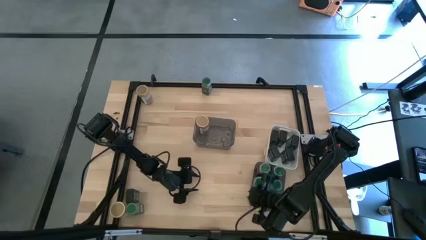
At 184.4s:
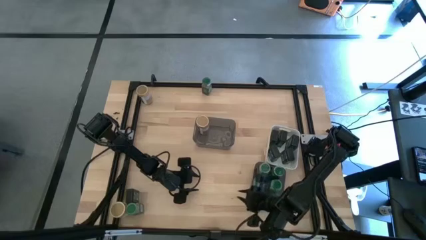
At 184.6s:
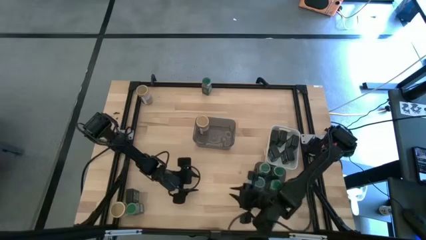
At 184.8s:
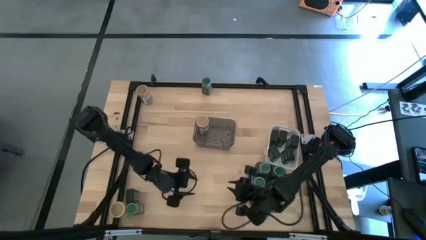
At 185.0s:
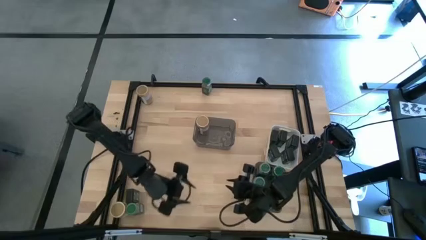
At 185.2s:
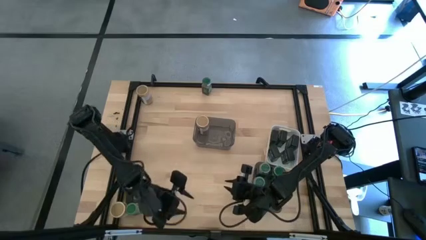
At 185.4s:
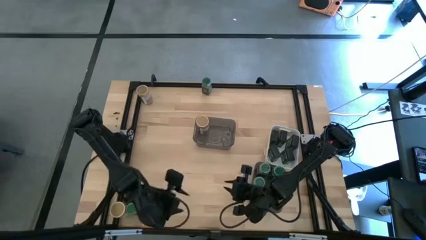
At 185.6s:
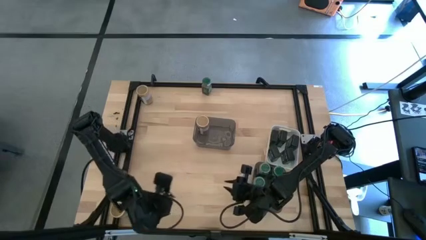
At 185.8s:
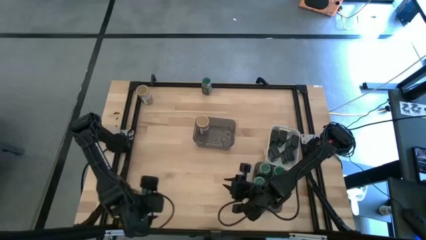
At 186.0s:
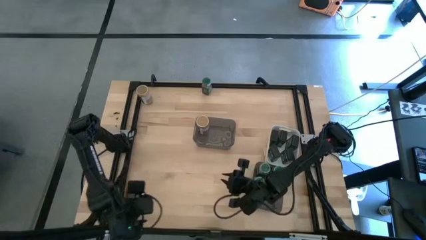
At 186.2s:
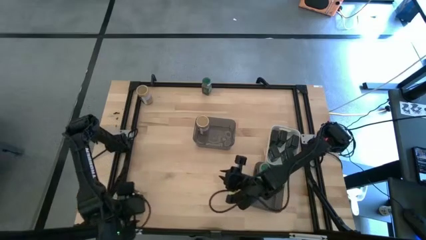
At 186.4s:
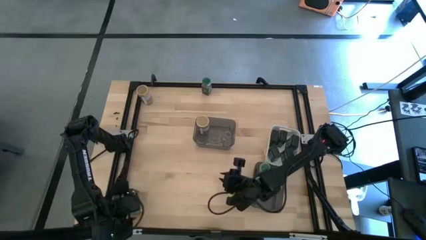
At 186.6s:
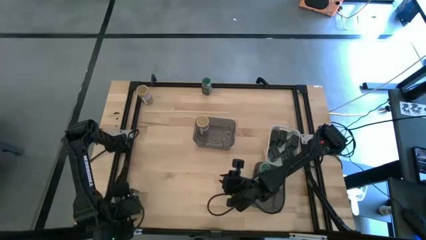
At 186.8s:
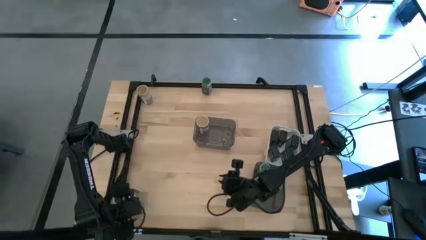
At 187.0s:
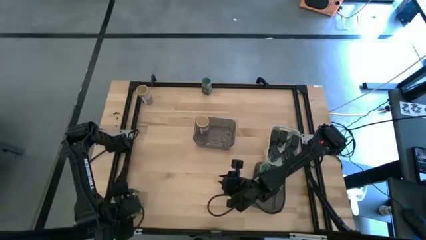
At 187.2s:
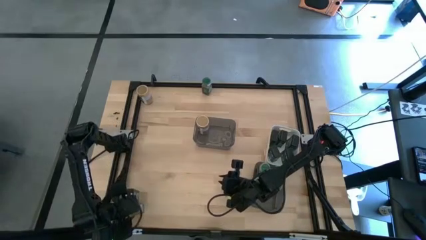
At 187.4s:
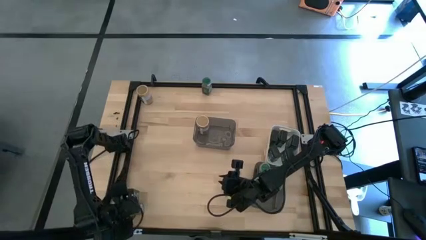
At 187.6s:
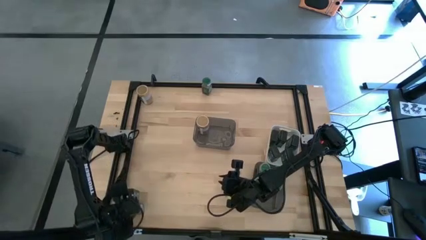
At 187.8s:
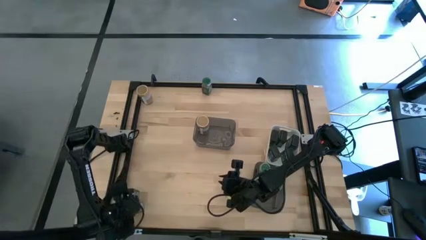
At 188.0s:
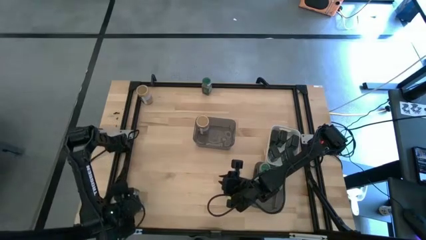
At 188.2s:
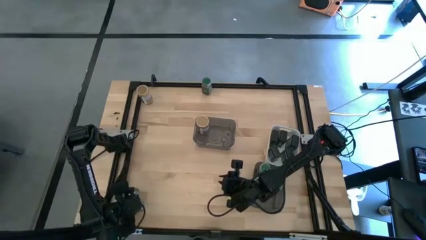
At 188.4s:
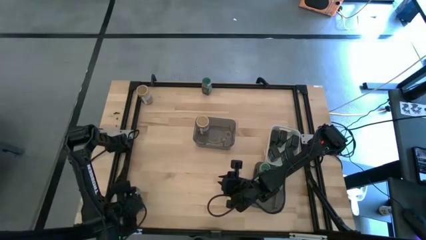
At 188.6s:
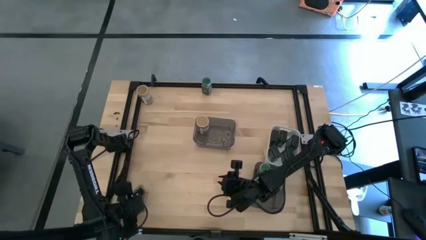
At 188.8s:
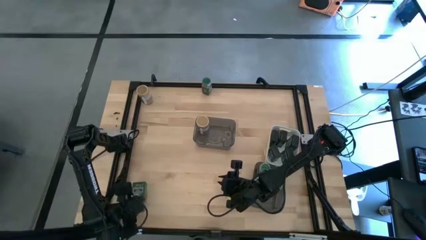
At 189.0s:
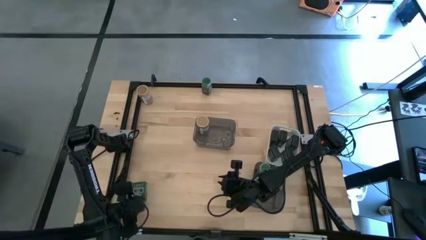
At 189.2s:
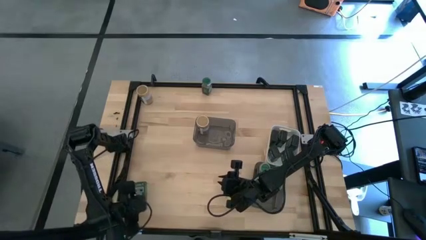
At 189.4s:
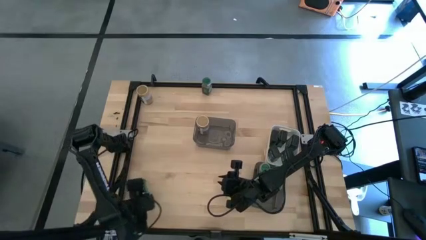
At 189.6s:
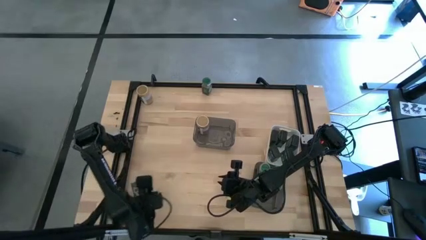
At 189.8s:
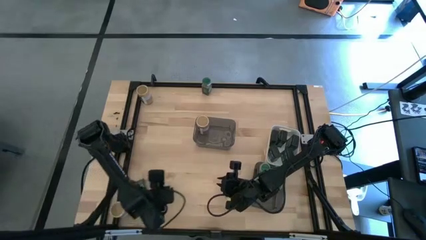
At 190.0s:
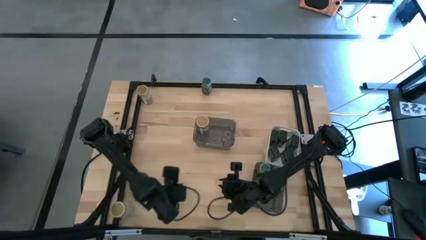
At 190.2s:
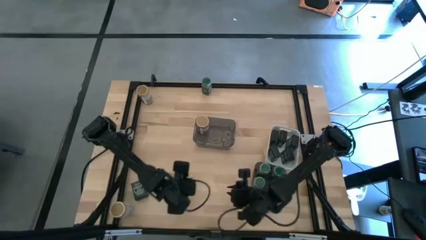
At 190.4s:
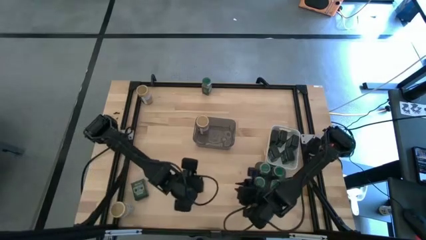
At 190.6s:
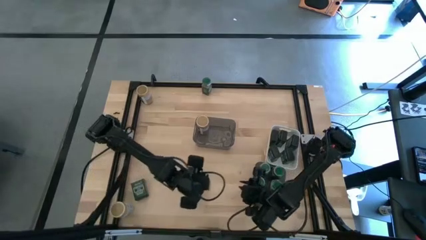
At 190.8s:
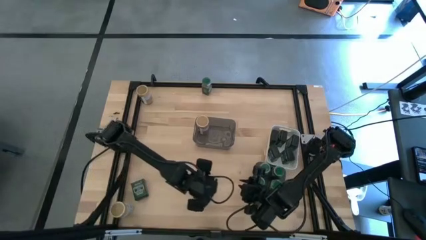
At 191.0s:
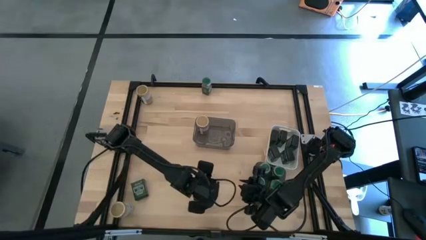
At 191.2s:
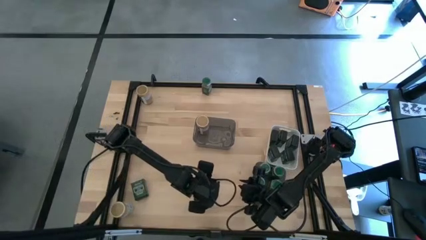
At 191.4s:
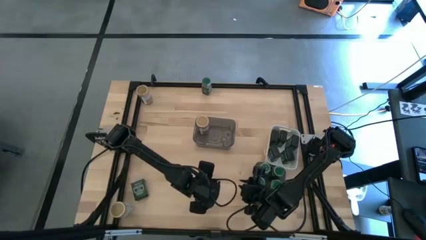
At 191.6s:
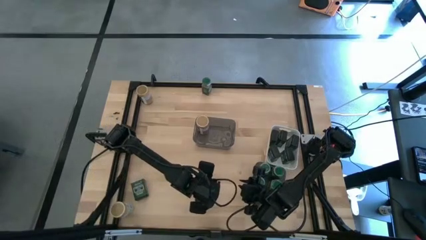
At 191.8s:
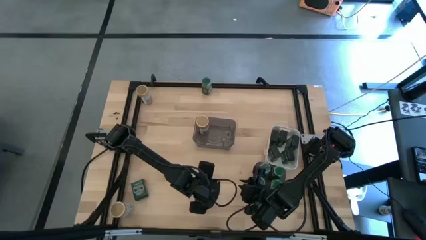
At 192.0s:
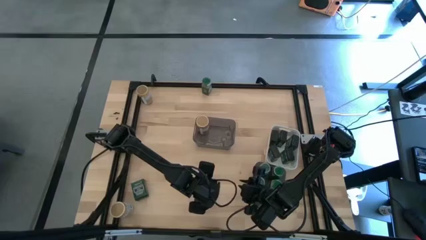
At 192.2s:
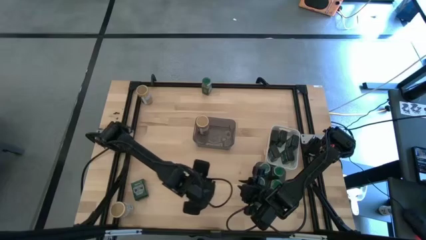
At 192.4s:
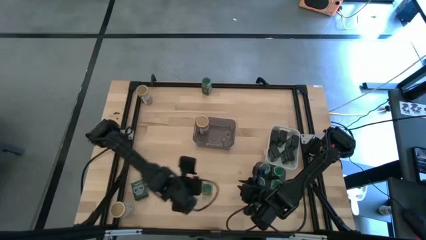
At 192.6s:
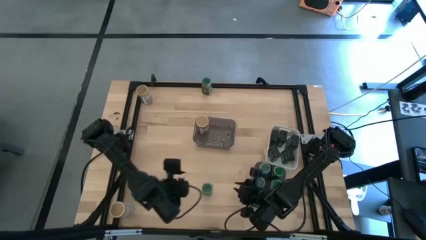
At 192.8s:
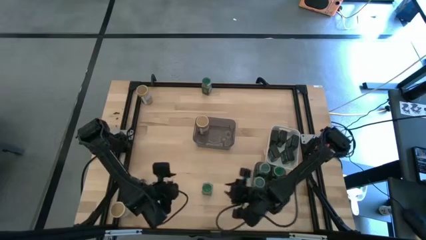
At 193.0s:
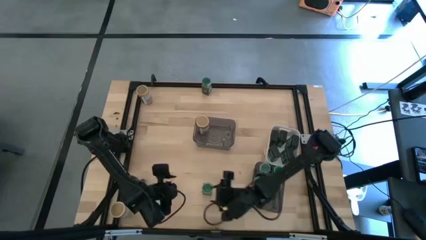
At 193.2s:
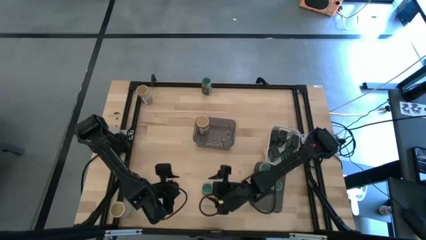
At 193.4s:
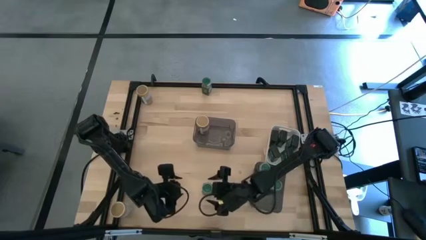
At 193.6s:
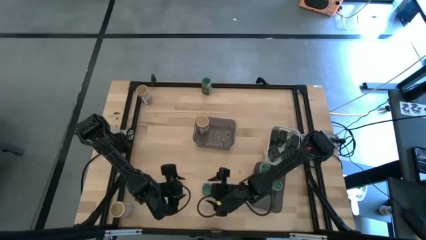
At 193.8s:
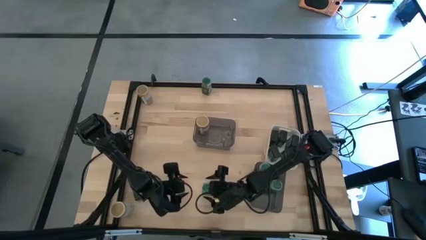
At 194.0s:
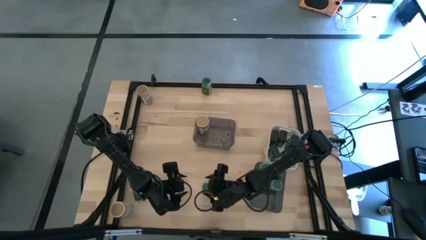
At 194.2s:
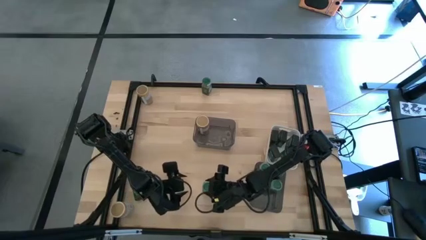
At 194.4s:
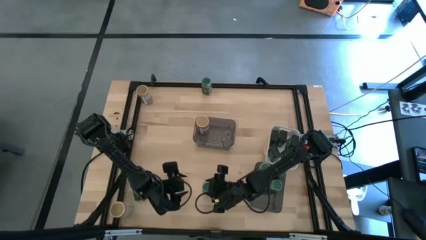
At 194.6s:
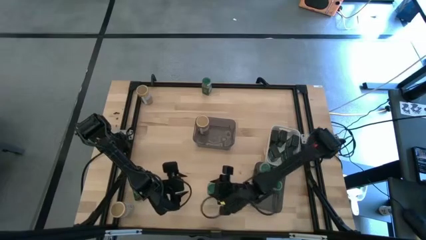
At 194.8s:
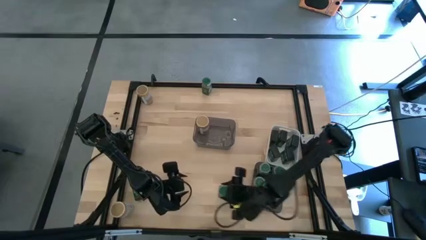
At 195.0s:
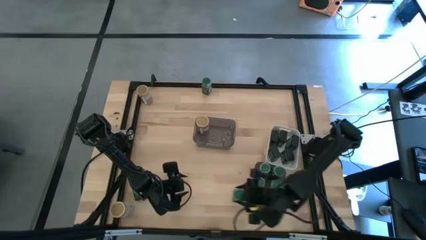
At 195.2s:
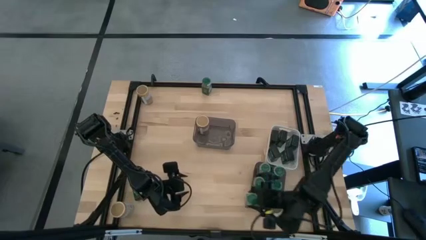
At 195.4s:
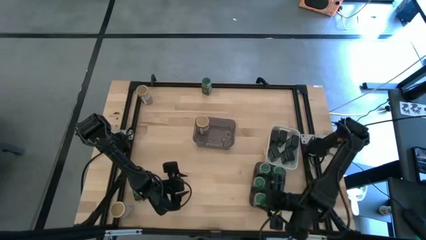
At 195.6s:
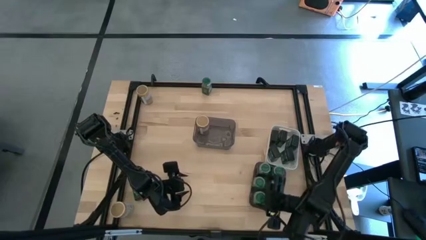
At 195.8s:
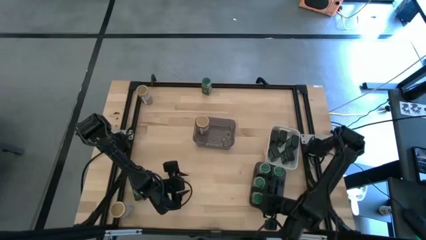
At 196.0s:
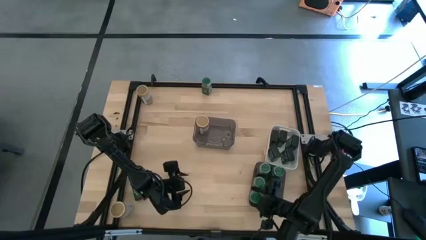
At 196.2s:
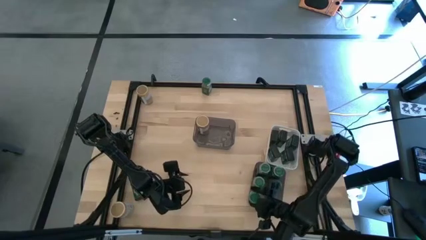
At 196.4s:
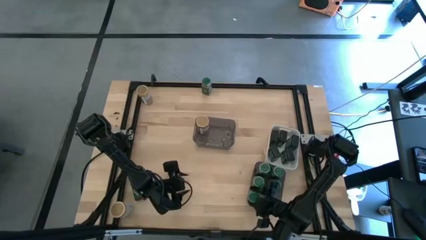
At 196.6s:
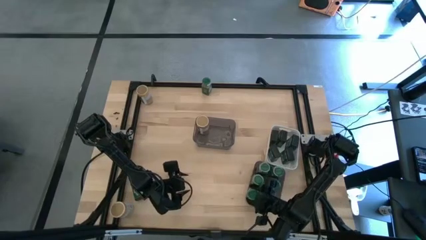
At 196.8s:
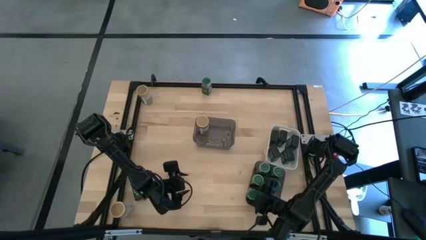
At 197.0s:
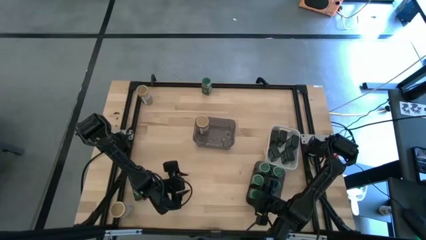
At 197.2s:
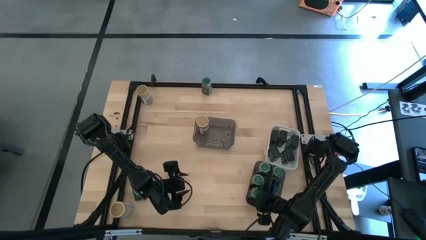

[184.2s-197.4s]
Task: Sort spices by type
Put the bottom green seasoning bottle into the bottom black bin

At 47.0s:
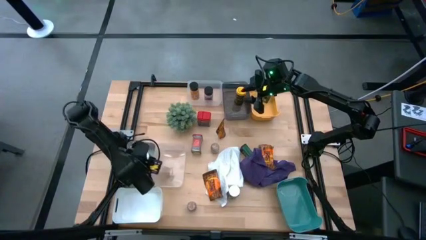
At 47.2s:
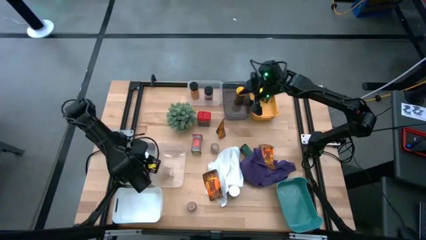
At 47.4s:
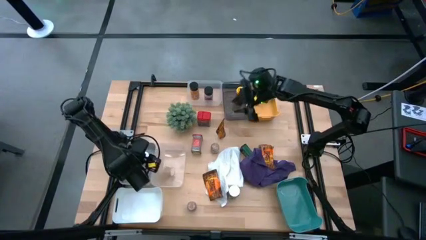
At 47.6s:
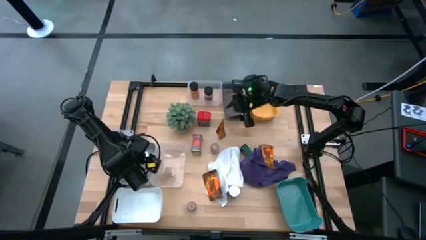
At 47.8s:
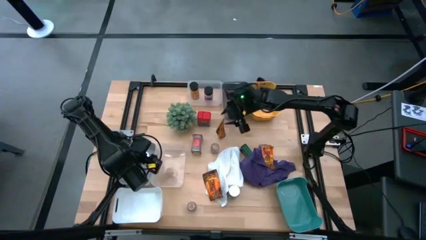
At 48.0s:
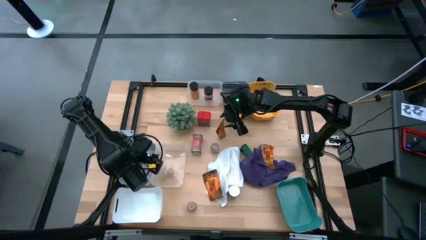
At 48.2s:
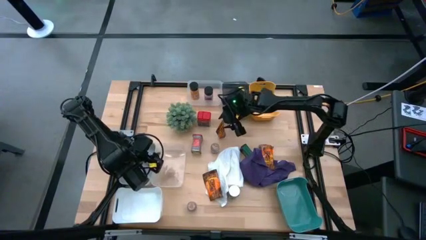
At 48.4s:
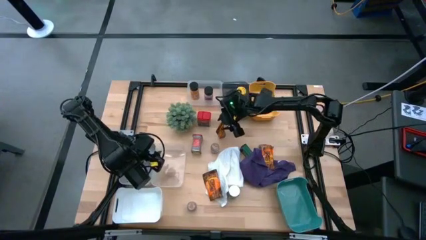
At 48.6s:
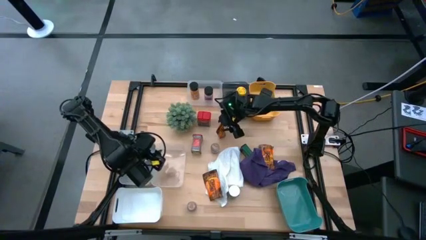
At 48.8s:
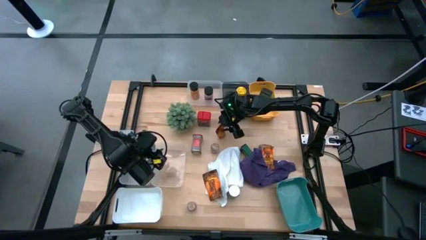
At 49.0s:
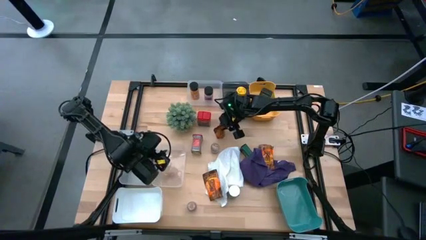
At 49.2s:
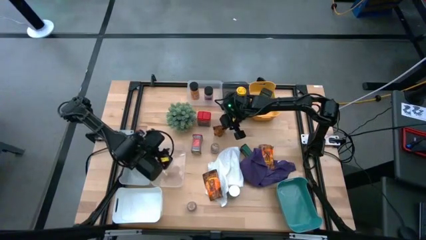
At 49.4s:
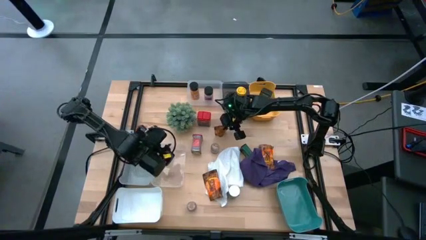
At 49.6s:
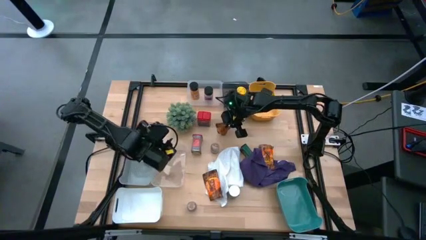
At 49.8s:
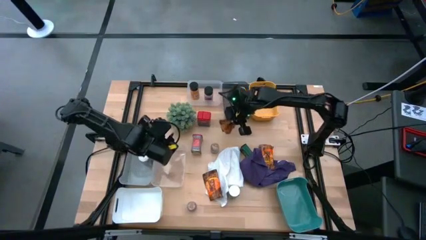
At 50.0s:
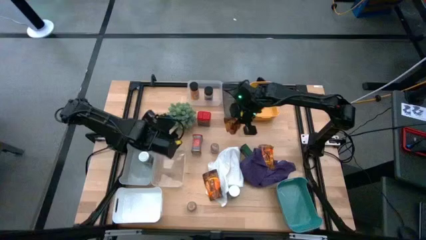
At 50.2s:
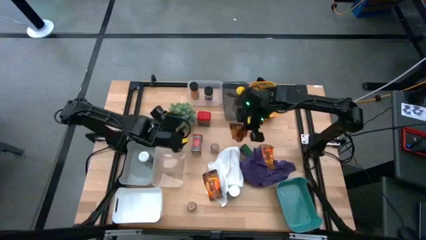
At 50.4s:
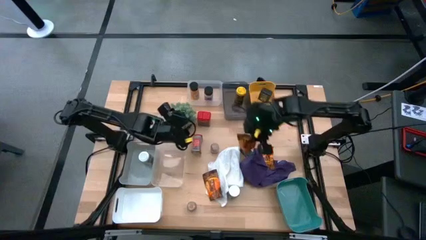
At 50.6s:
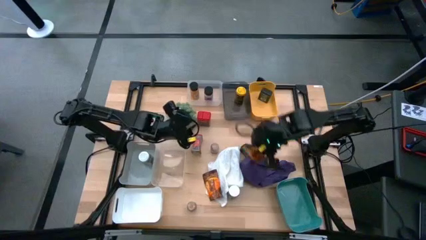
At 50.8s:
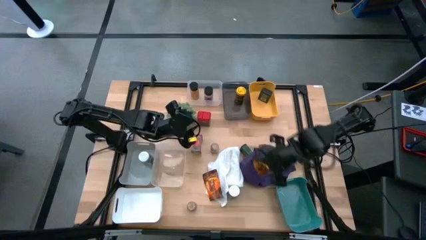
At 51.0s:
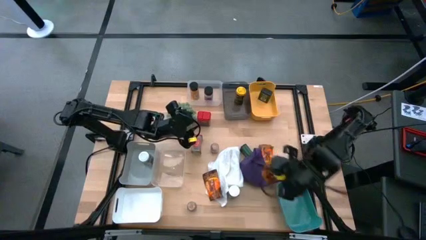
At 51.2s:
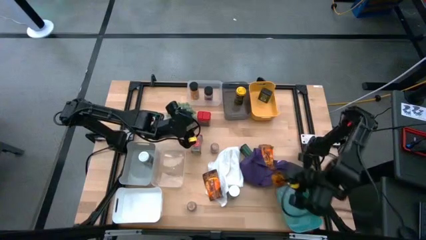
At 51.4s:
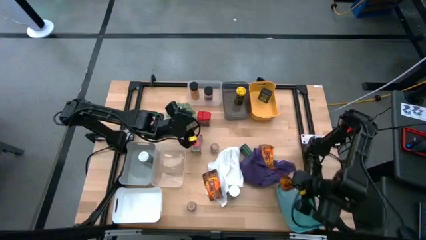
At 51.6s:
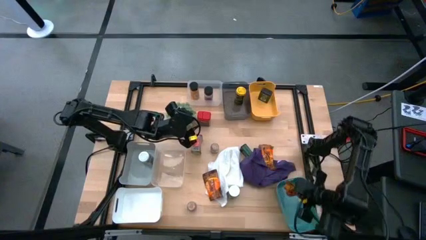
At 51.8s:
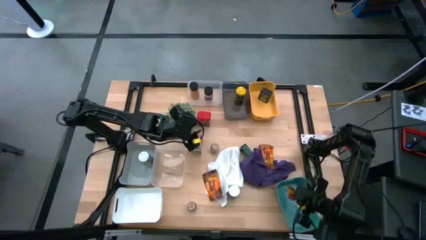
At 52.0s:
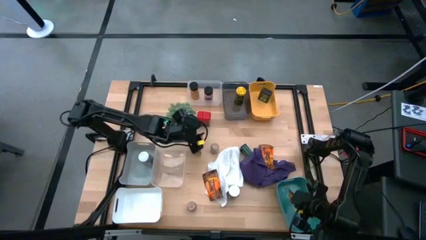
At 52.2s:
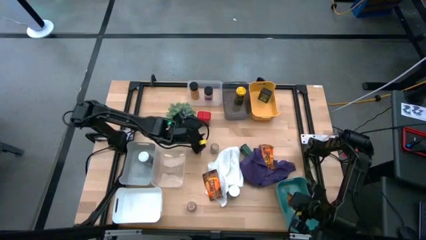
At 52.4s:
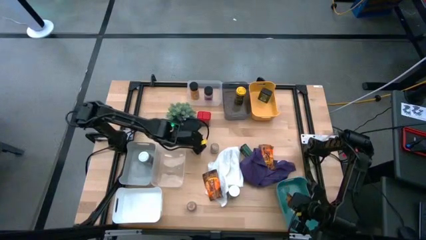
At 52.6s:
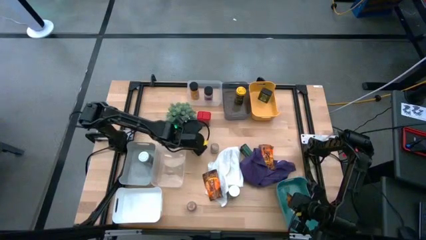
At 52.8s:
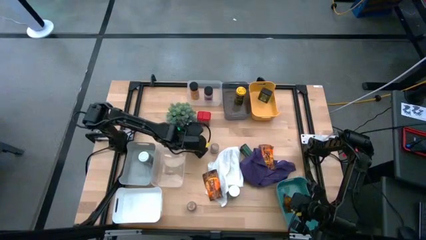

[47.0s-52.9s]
Task: Sort spices by type
Put the top orange seasoning bag into the green bin
